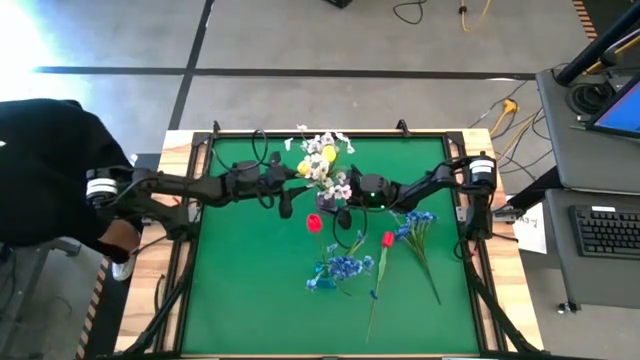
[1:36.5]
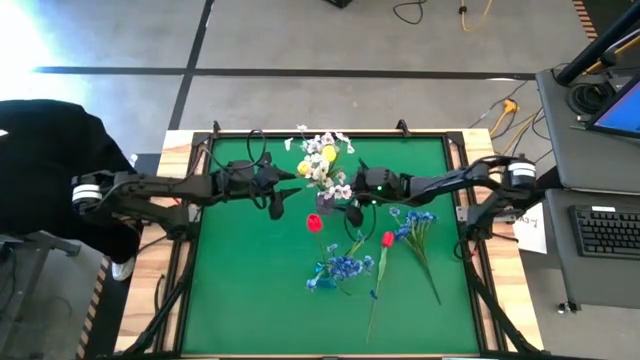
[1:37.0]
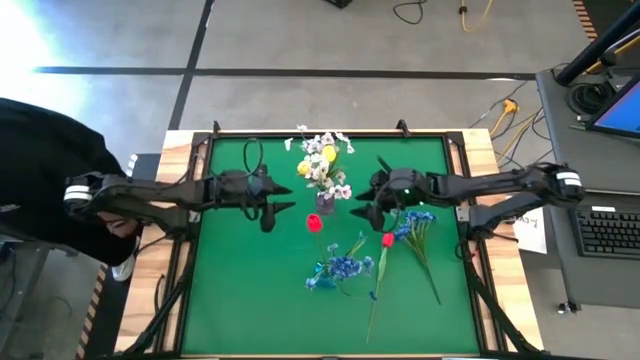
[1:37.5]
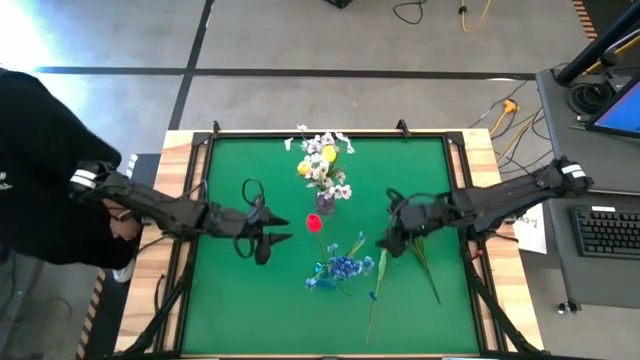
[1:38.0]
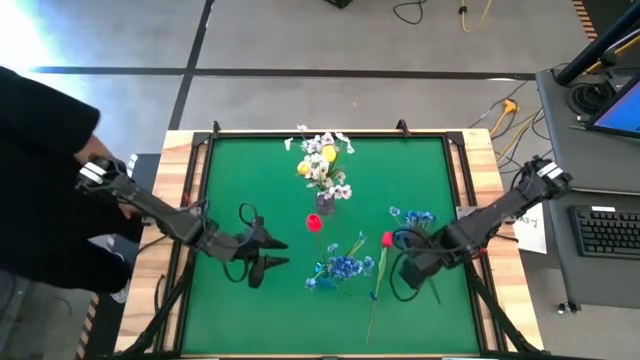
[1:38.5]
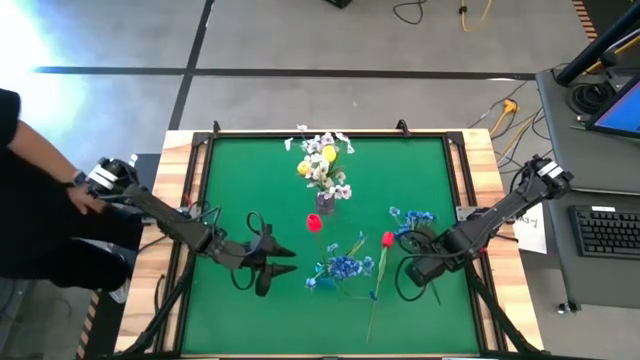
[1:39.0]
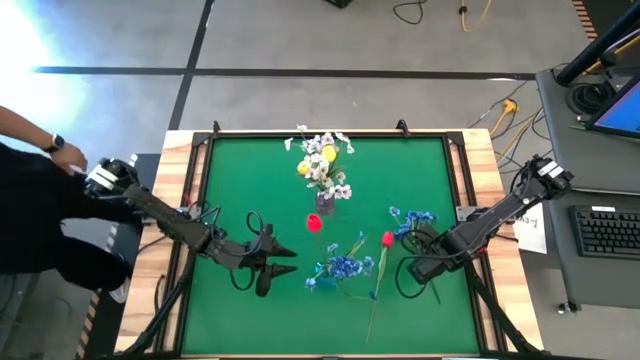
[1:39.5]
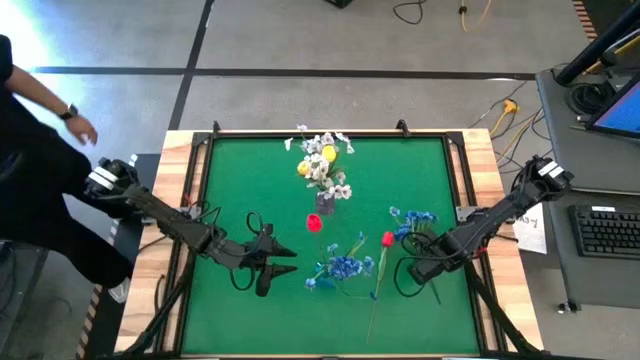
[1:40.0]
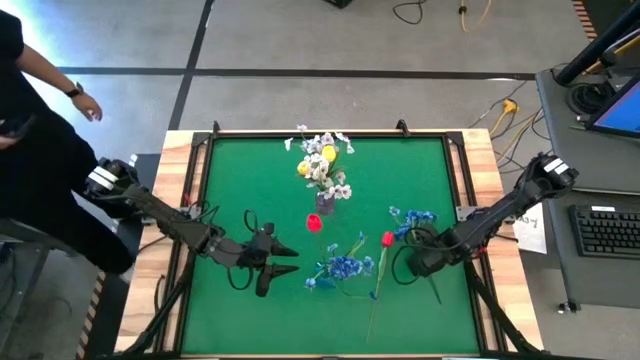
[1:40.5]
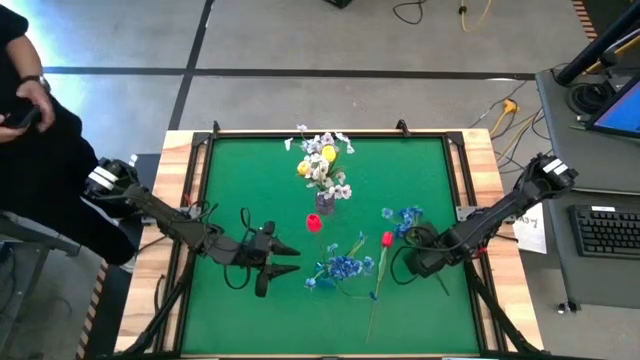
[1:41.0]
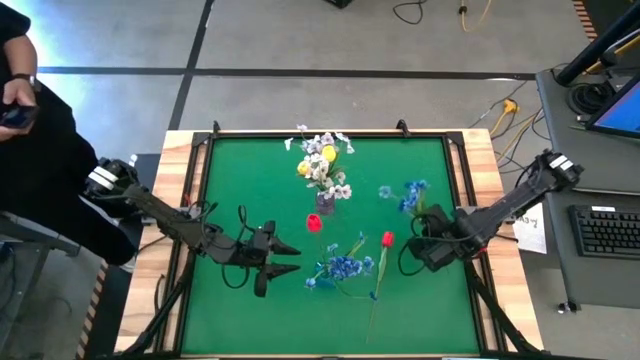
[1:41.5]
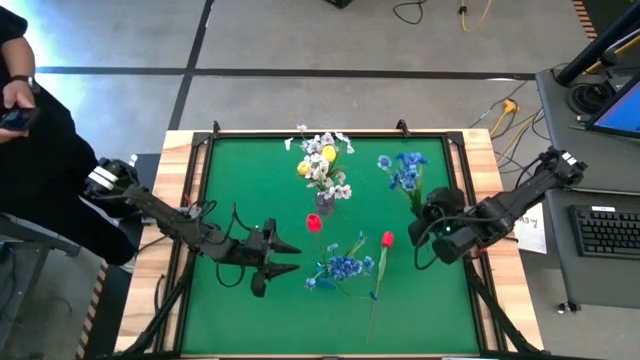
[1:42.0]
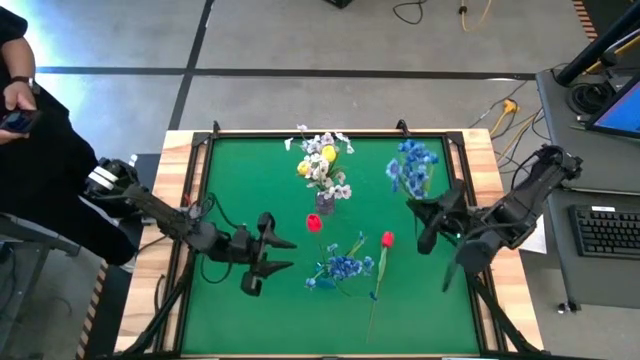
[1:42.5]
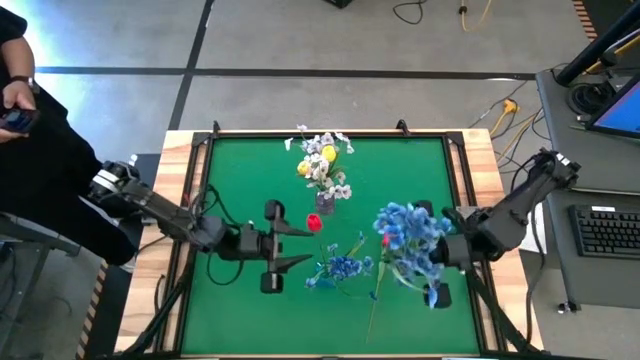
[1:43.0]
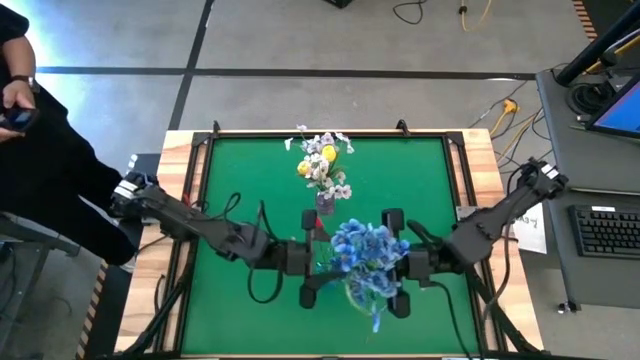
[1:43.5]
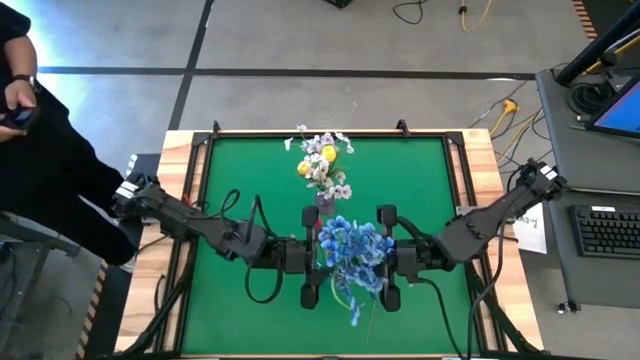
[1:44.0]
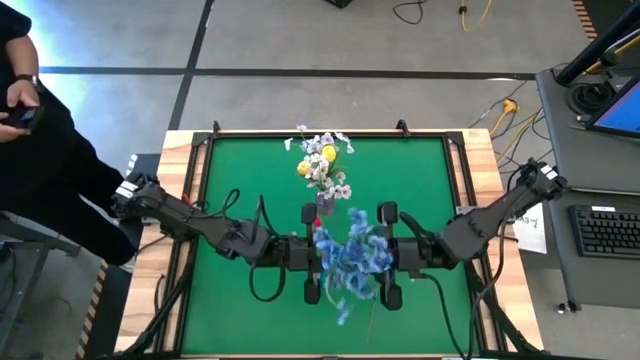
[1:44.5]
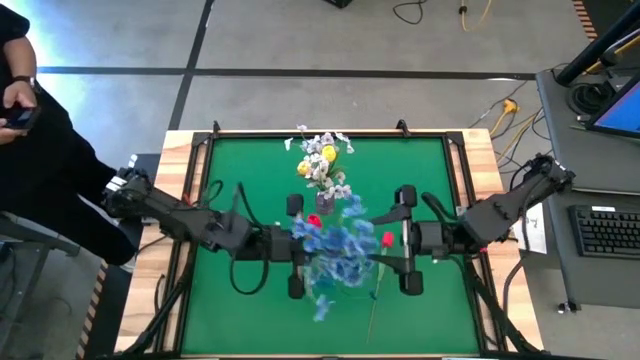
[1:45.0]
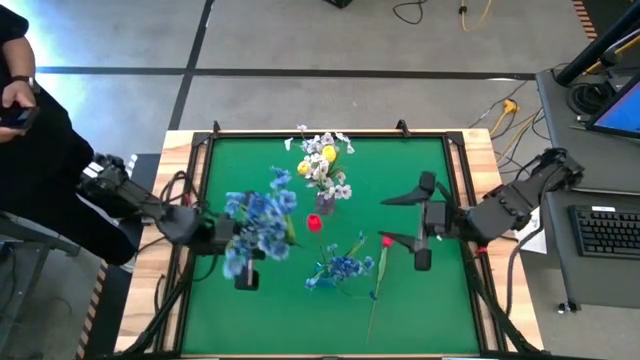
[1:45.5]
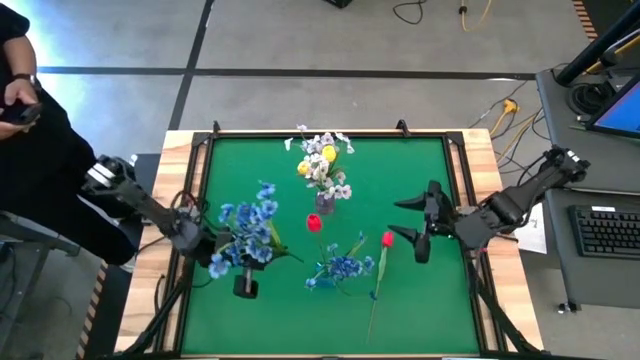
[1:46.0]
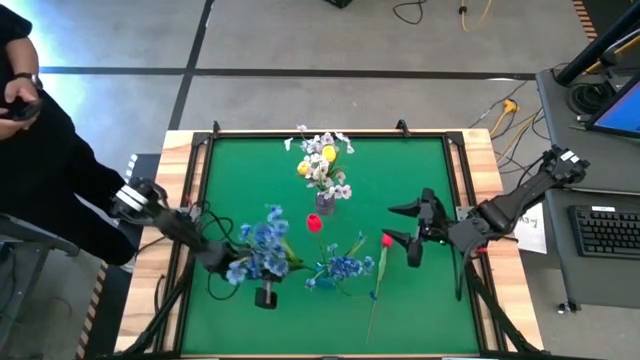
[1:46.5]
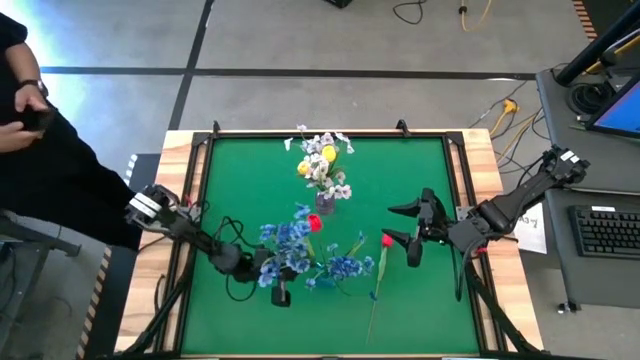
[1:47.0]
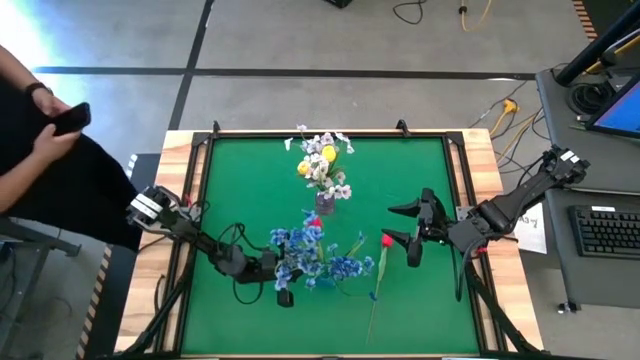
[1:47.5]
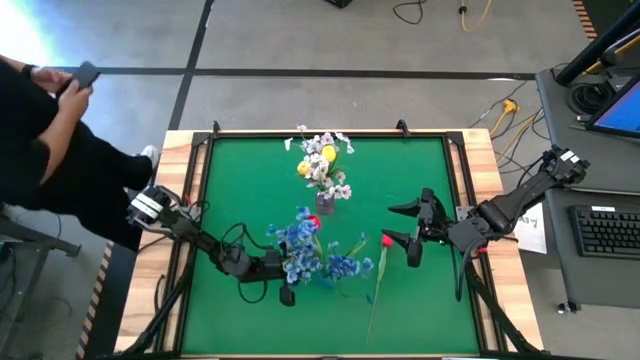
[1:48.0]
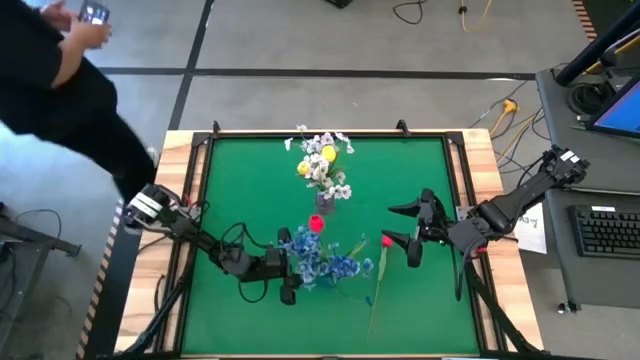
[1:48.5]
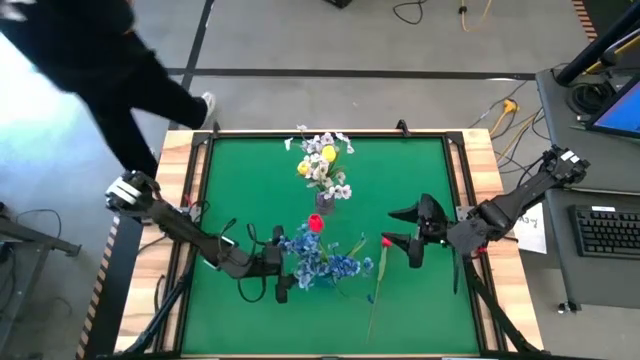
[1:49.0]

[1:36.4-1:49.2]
Task: Sort flowers into vase by color
Put the blue flowers into the blue vase

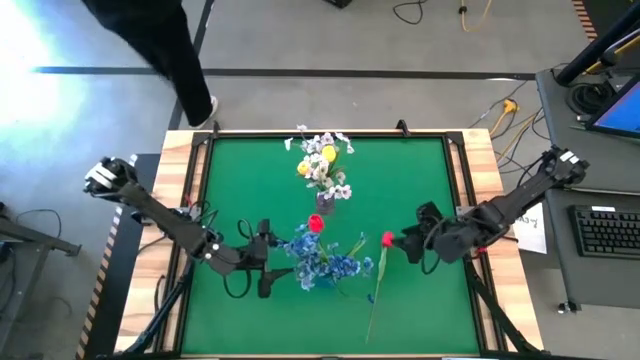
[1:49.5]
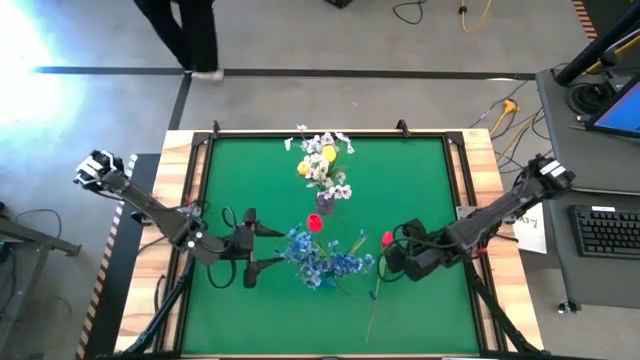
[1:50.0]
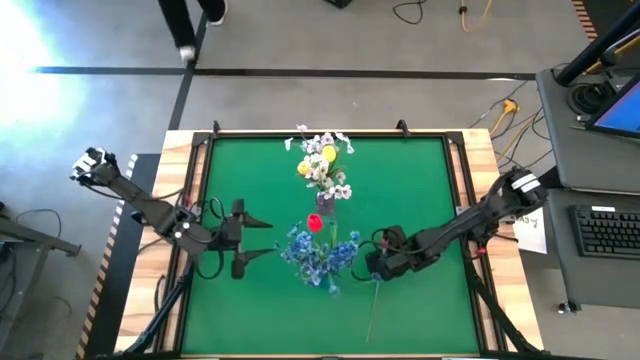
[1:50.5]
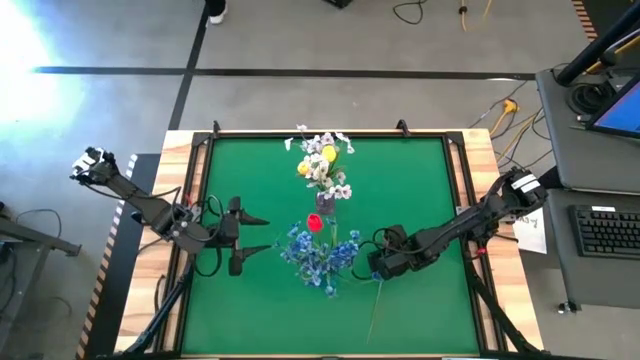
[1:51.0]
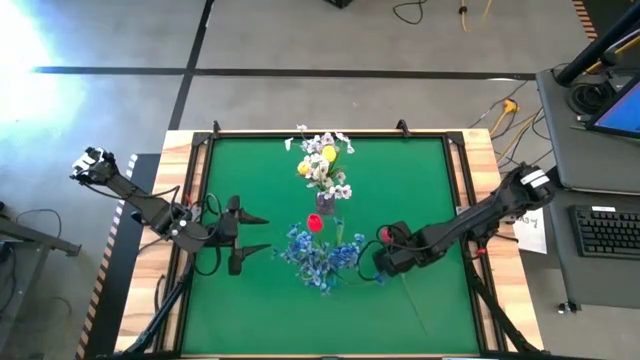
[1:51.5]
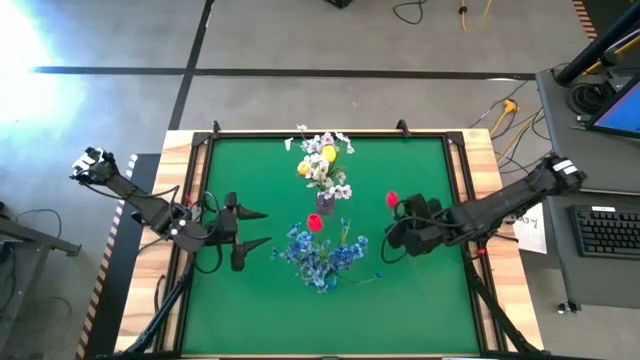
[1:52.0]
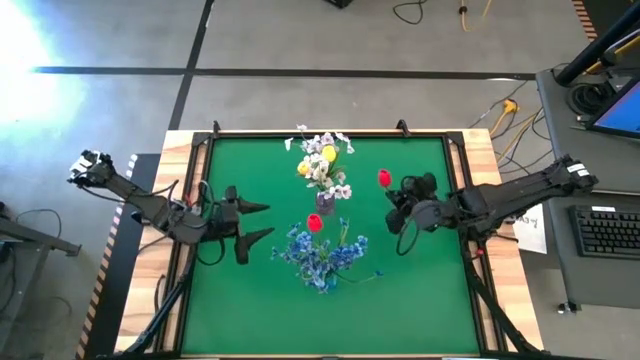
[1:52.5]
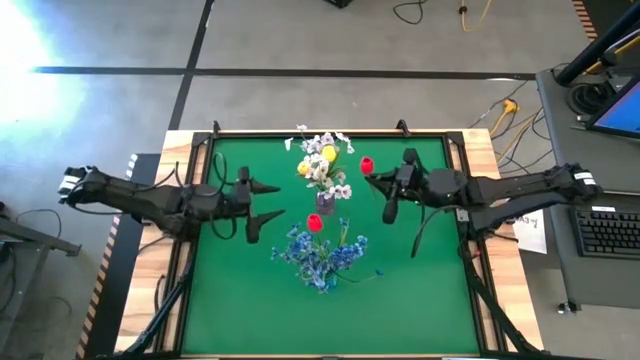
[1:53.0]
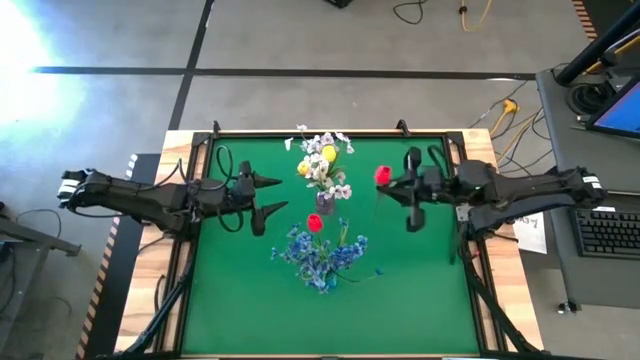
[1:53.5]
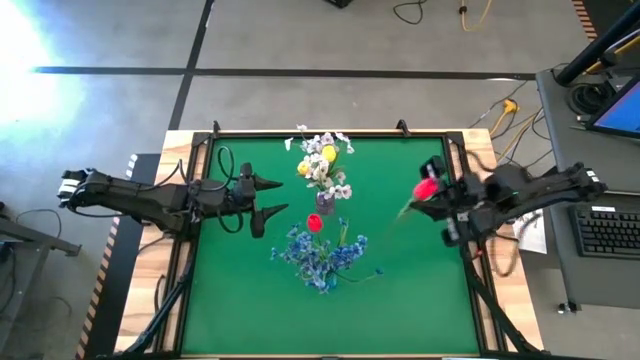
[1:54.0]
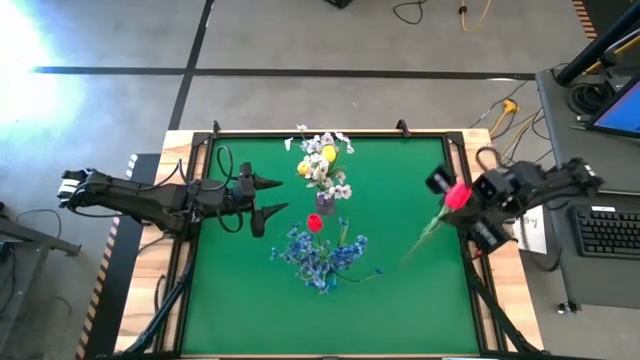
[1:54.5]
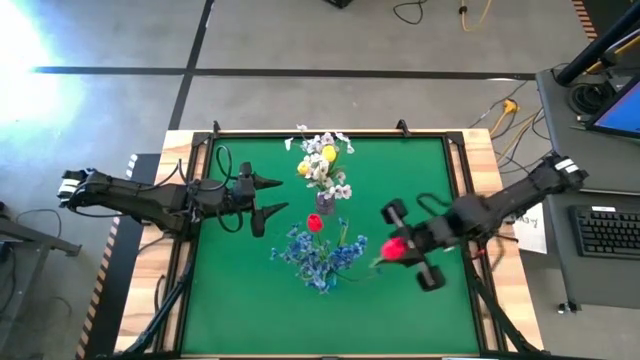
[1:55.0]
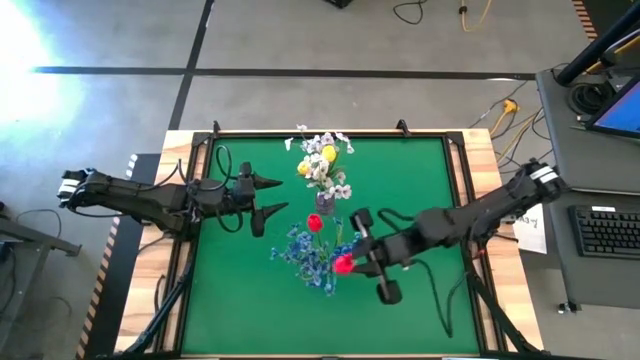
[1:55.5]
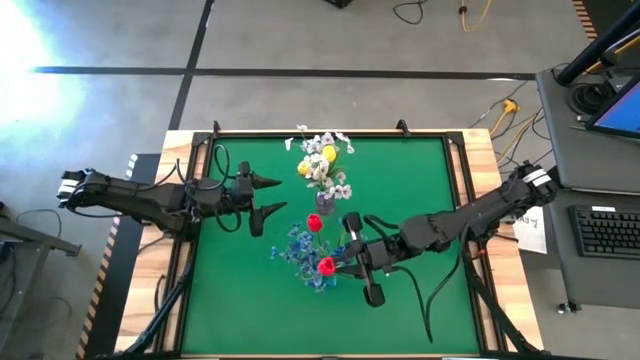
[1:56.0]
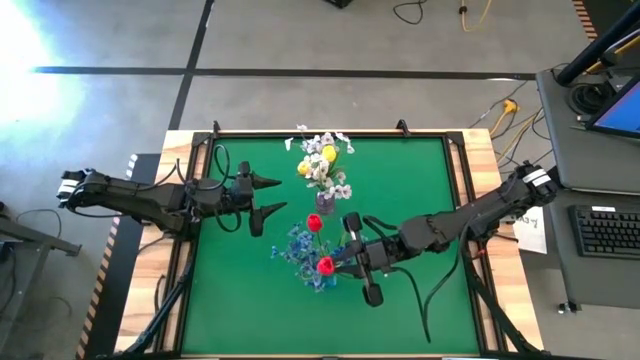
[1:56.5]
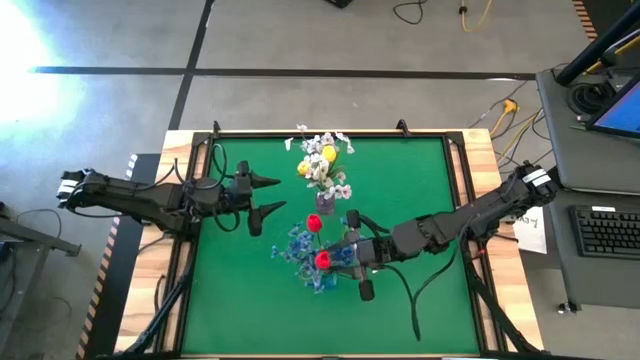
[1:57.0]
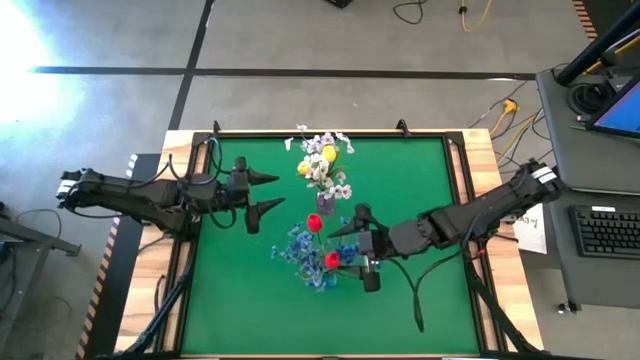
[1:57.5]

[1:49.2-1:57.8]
Put the red flower into the blue vase
